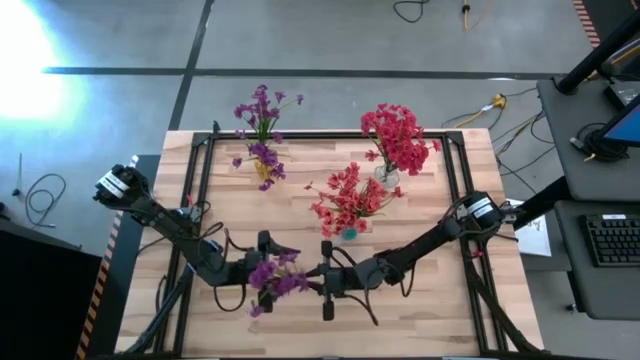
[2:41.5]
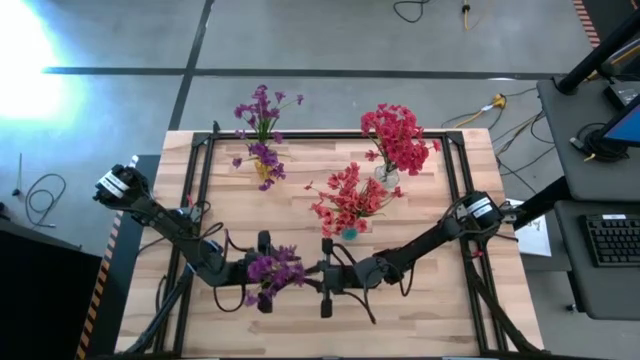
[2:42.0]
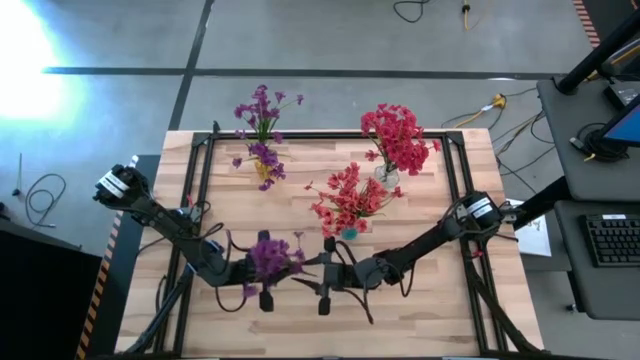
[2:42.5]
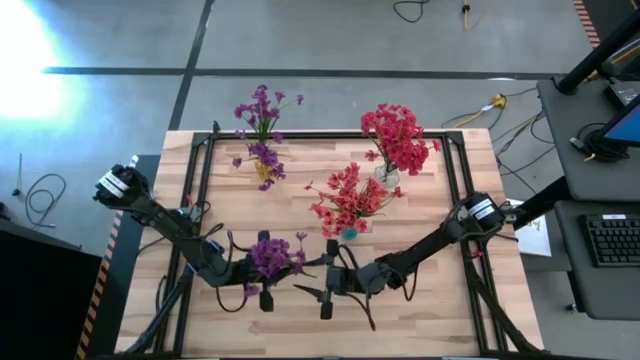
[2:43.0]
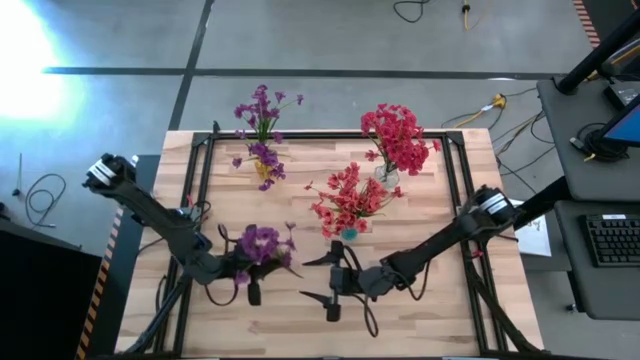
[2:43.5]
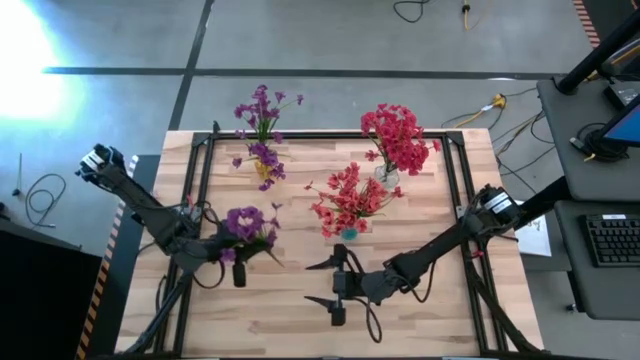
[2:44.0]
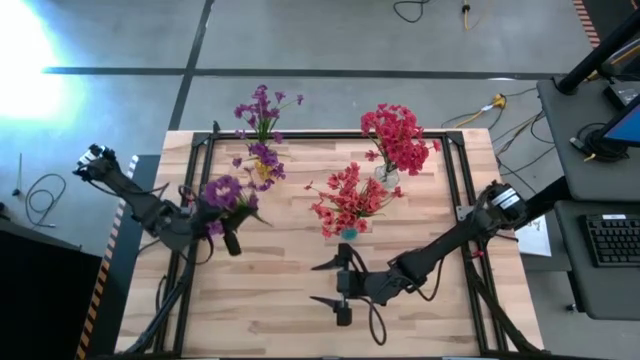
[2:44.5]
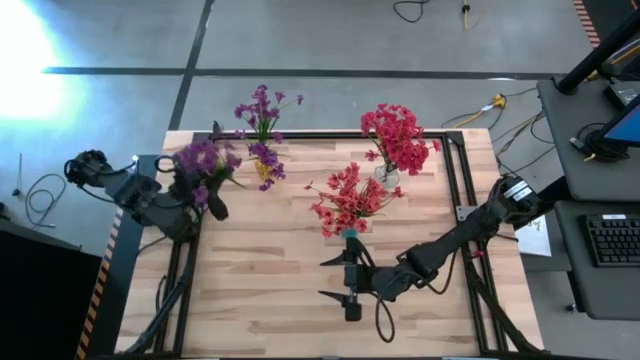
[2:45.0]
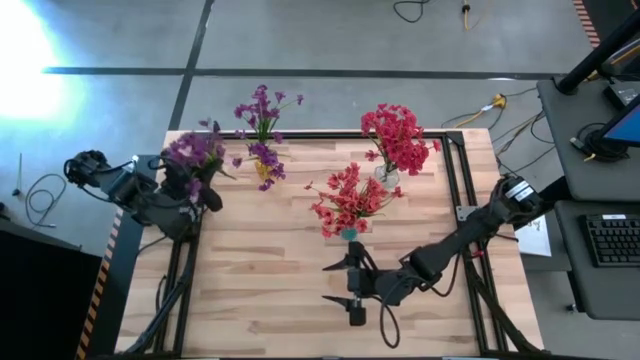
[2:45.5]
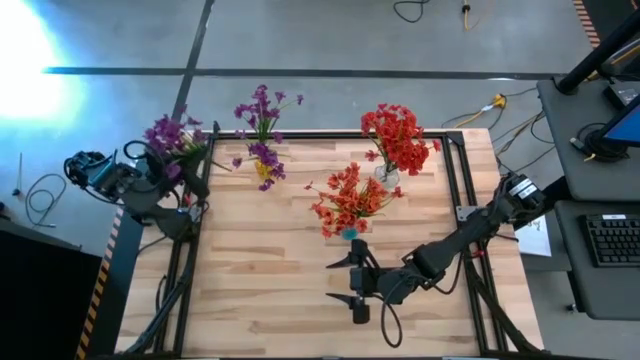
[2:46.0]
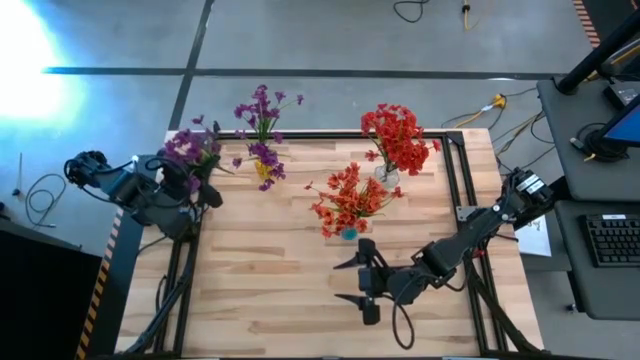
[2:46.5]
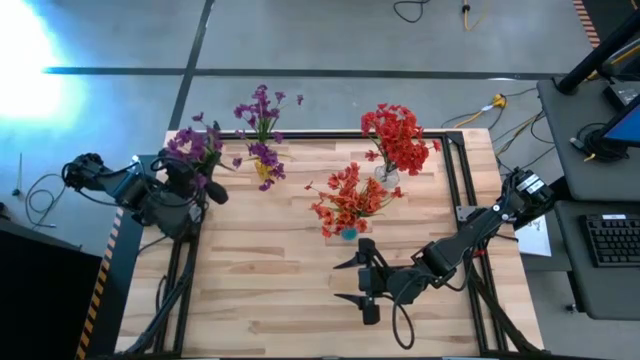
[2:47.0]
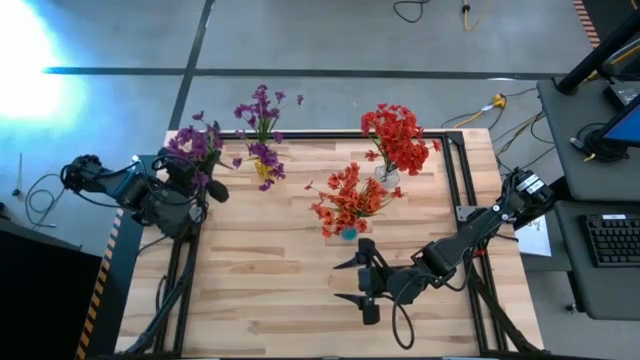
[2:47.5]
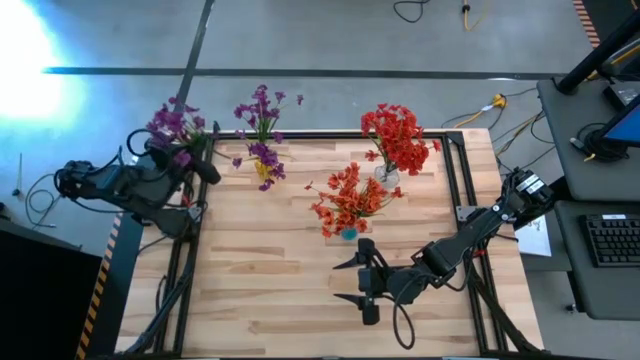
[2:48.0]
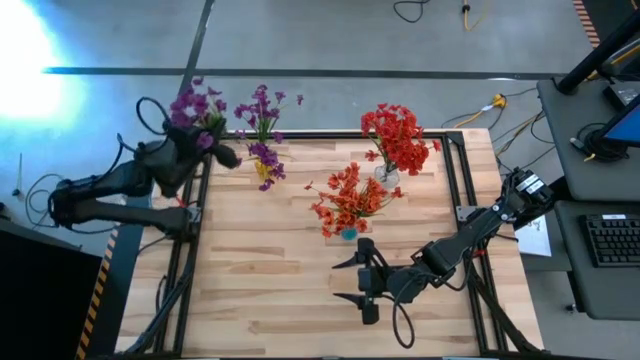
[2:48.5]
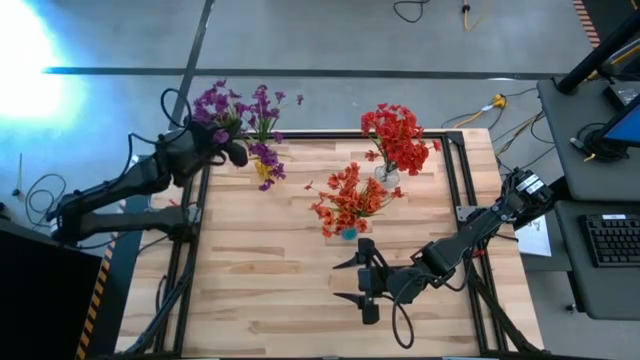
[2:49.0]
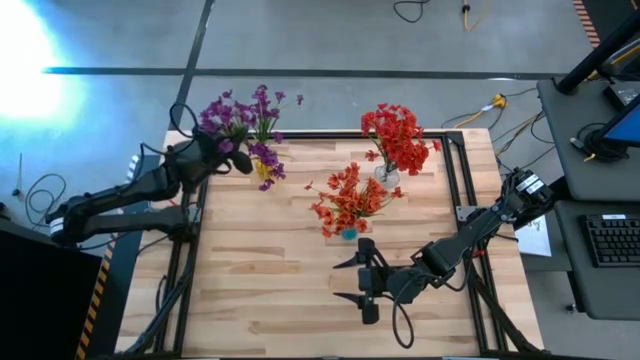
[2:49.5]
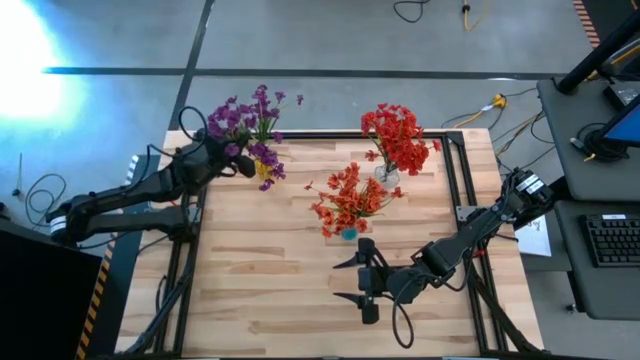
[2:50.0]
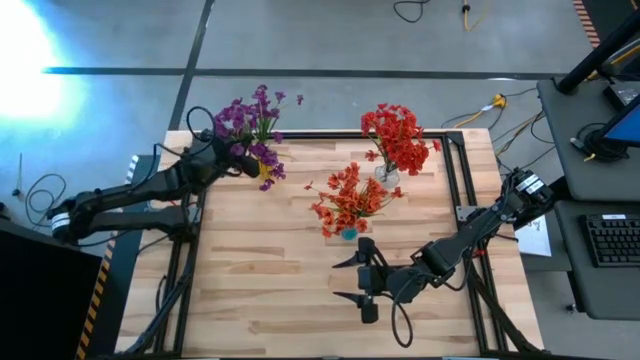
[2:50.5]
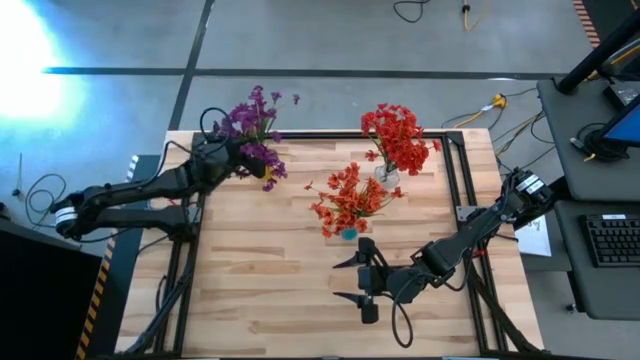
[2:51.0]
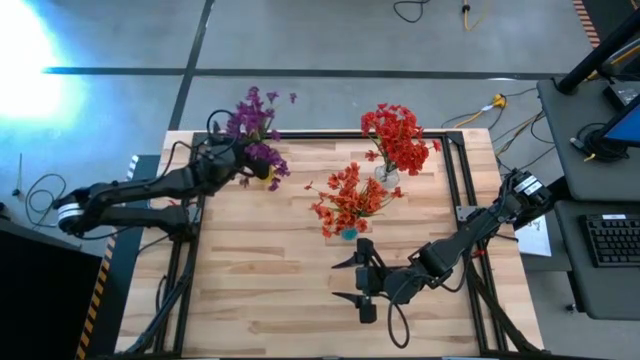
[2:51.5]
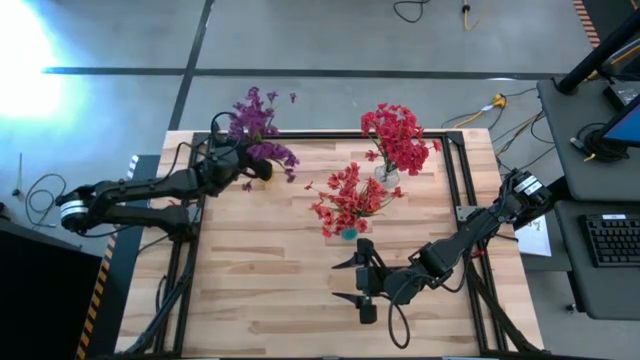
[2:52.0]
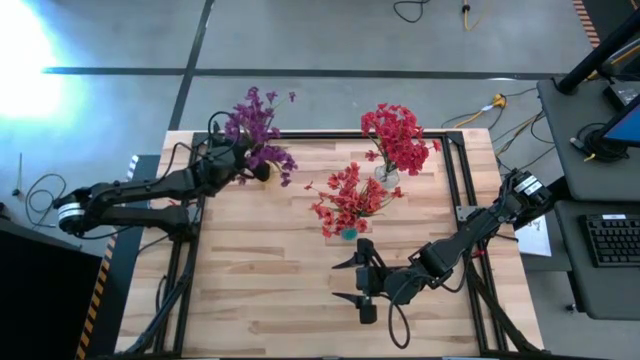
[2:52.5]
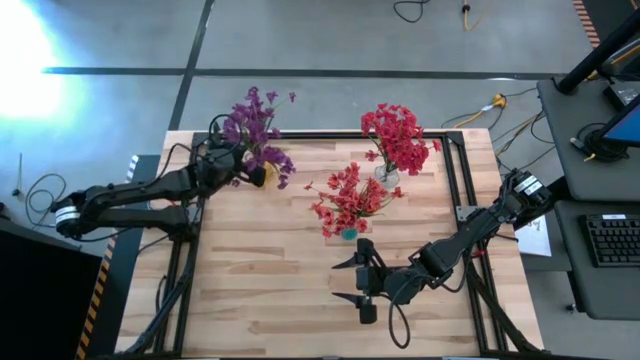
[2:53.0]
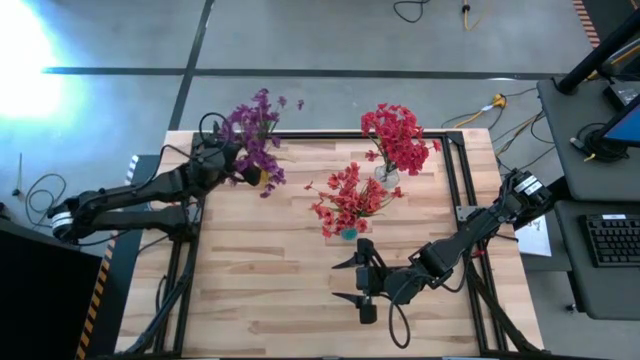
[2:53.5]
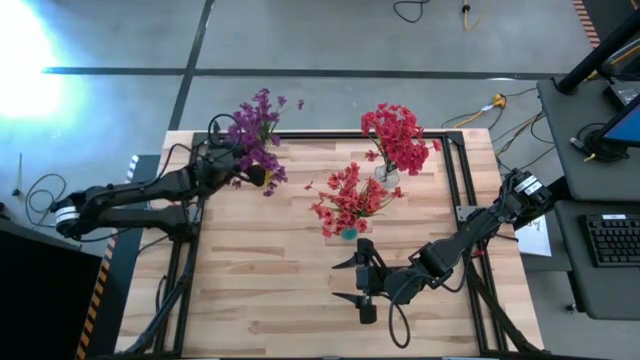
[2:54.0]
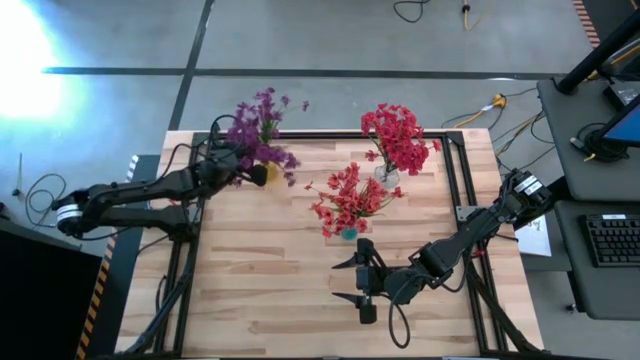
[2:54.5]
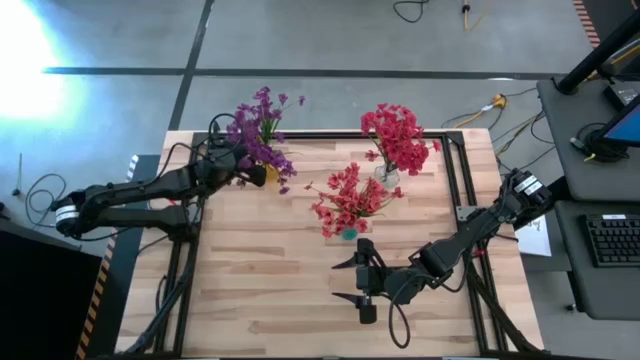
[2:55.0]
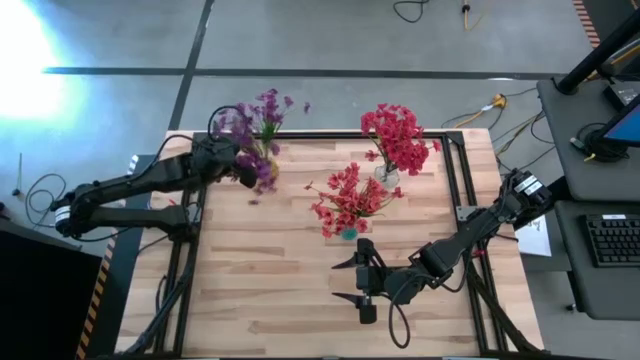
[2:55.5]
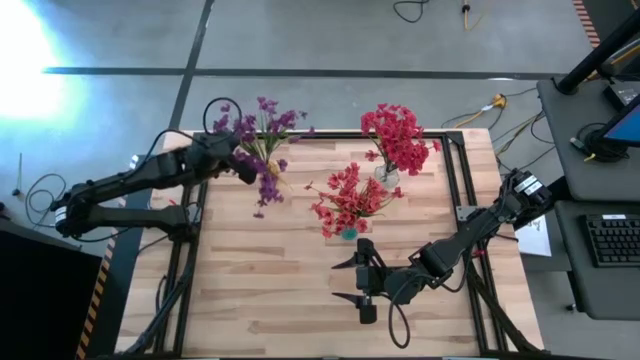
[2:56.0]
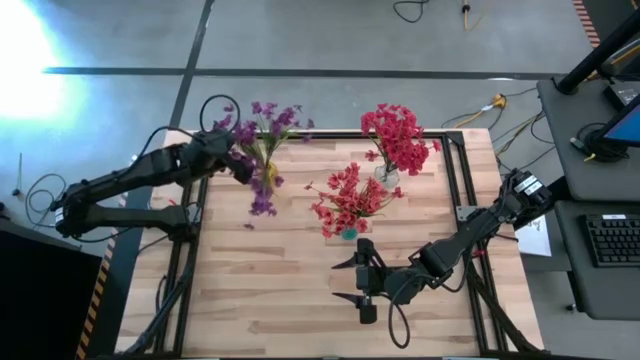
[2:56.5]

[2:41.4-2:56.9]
Task: Sort flowers into vase by color
Put the violet flowers into the yellow vase

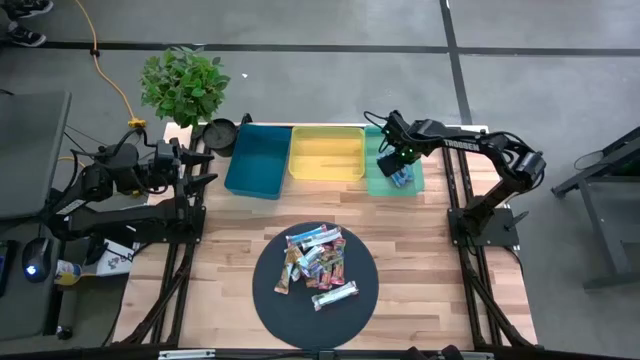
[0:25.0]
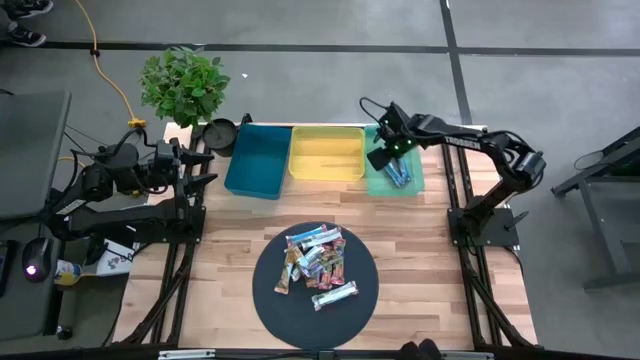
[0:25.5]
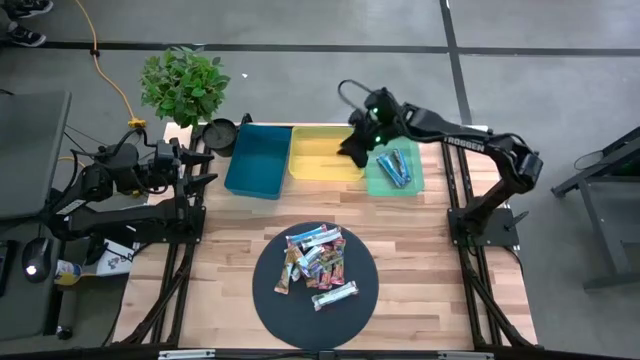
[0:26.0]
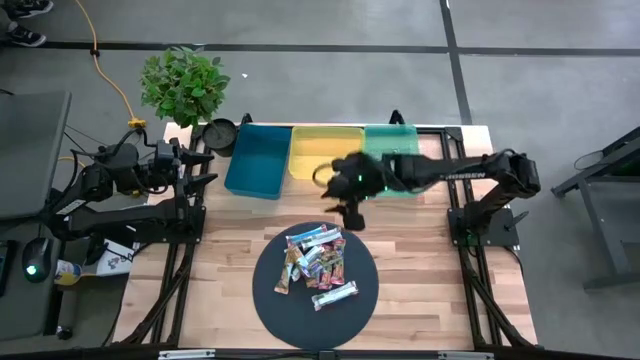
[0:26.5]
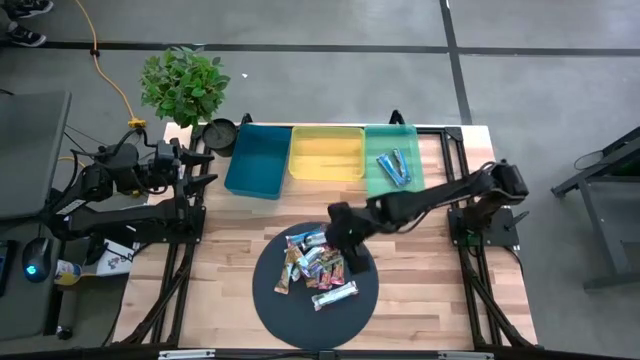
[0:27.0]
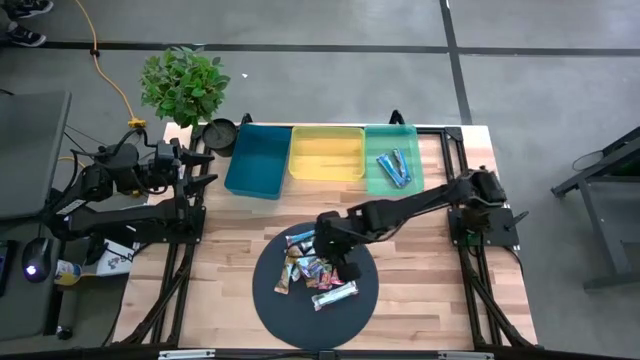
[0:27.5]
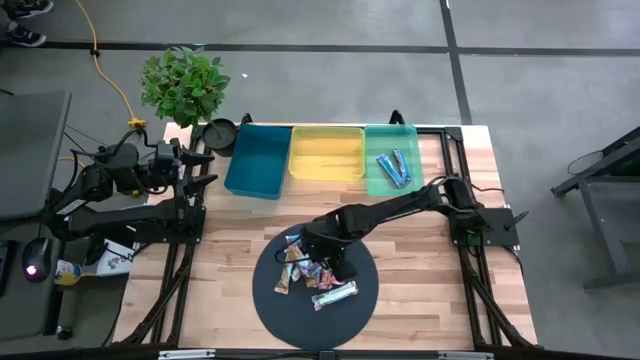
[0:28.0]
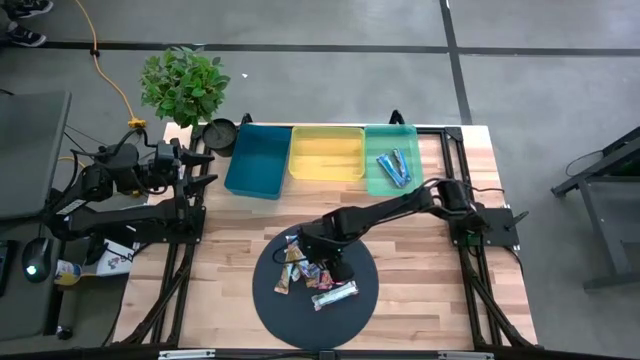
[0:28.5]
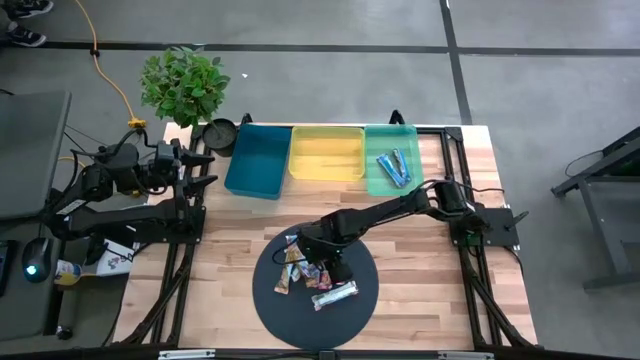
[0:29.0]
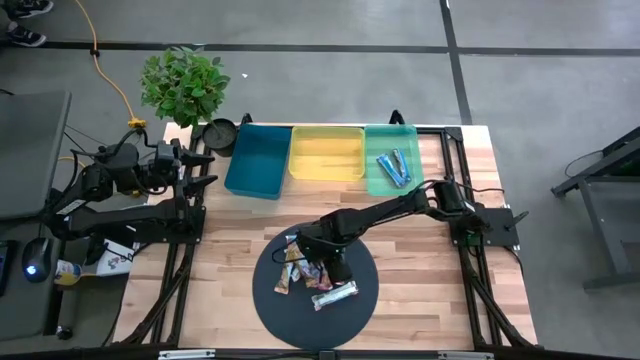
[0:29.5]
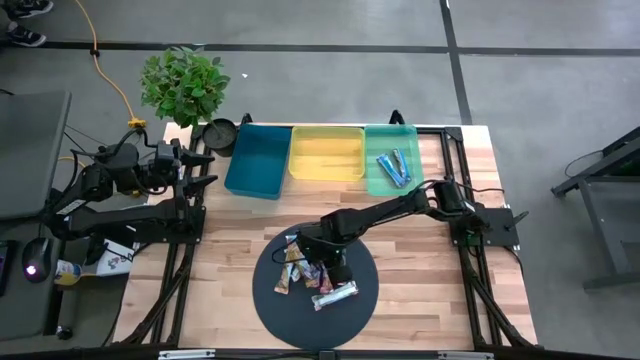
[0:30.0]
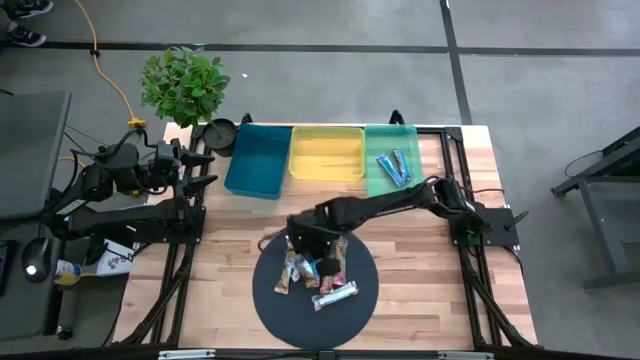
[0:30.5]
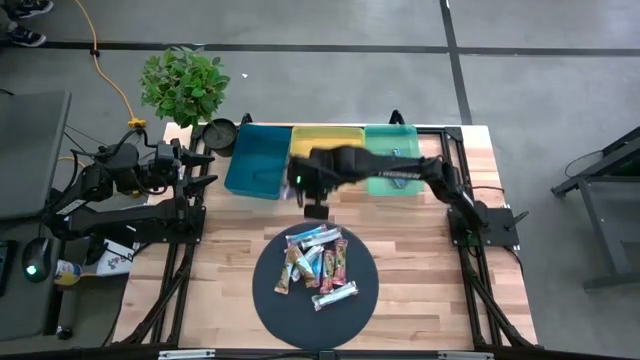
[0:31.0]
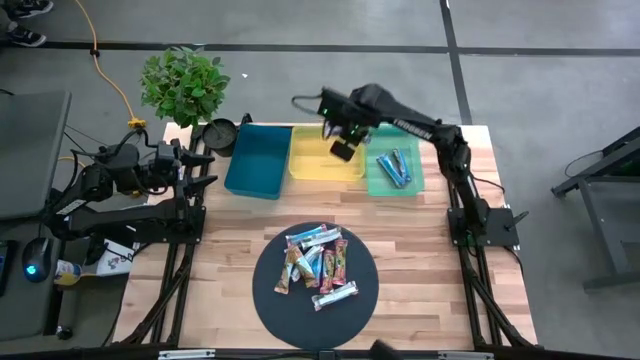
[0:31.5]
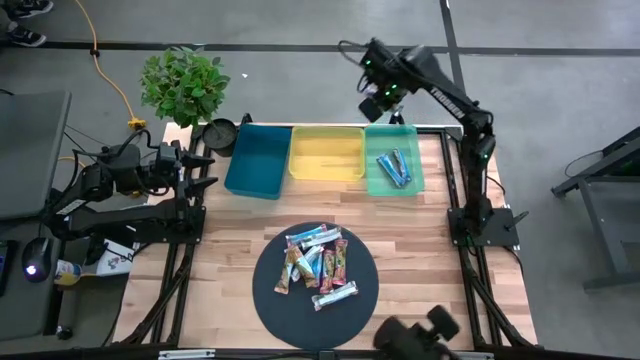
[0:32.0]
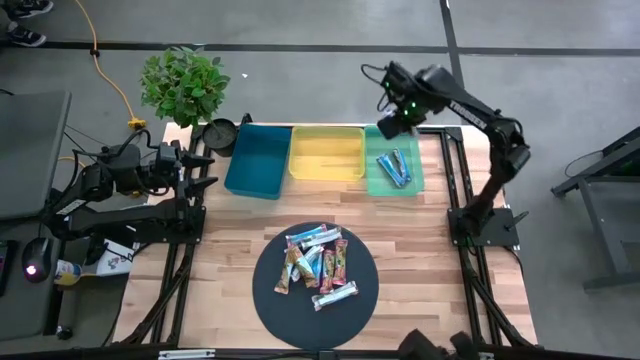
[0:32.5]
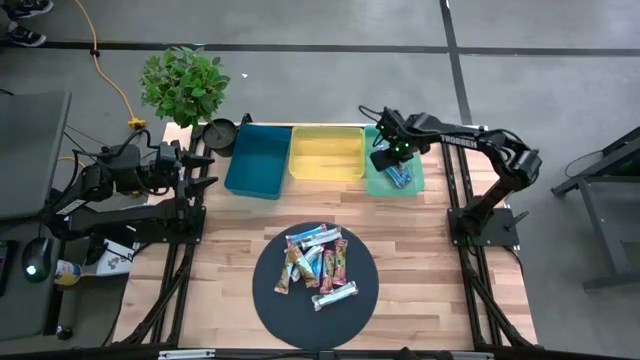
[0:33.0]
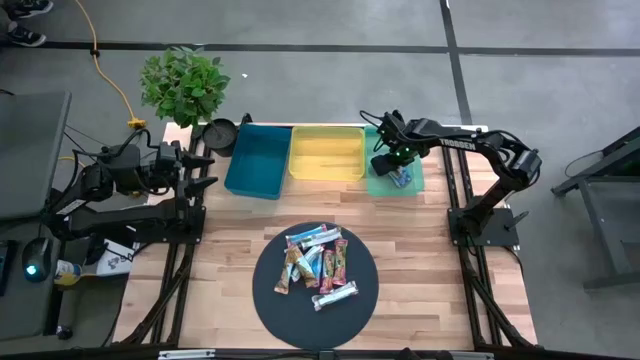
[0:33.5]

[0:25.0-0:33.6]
Task: Pick and place Granola Bars by type
Put the blue granola bar into the green bin
